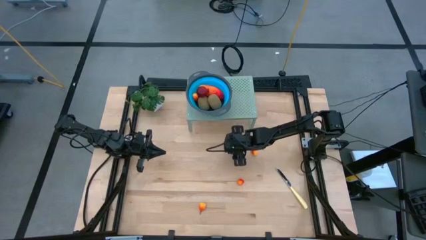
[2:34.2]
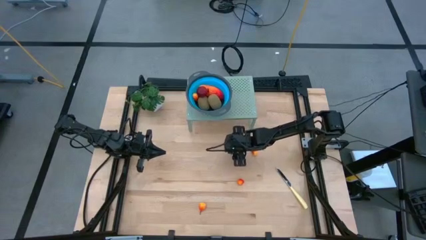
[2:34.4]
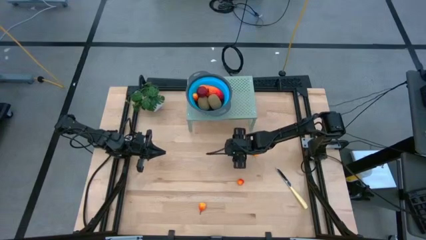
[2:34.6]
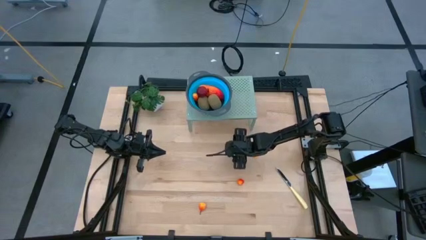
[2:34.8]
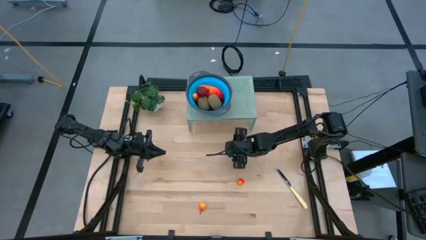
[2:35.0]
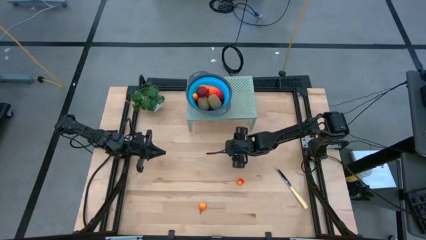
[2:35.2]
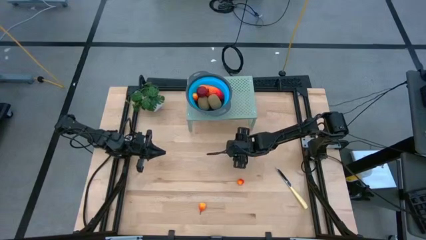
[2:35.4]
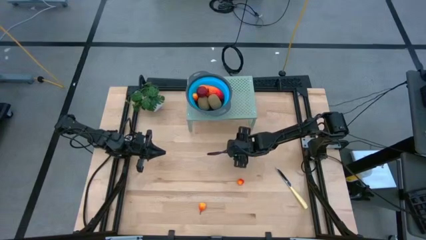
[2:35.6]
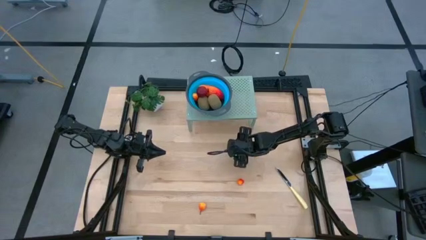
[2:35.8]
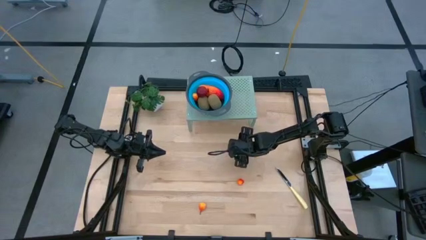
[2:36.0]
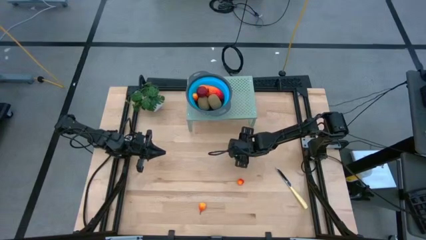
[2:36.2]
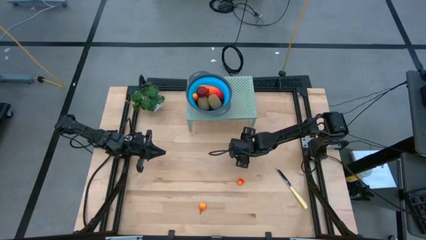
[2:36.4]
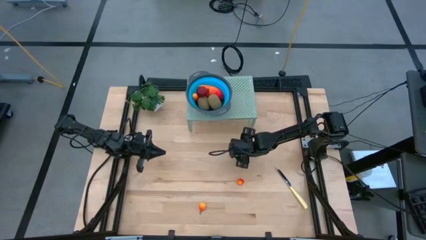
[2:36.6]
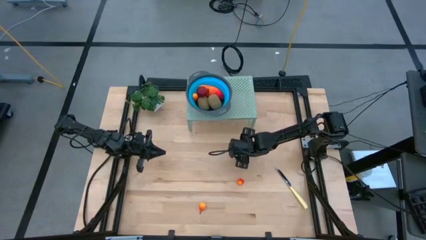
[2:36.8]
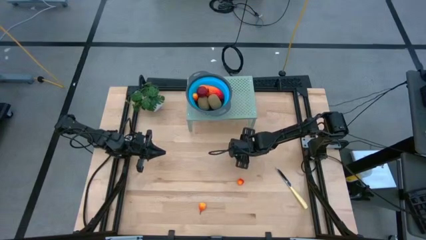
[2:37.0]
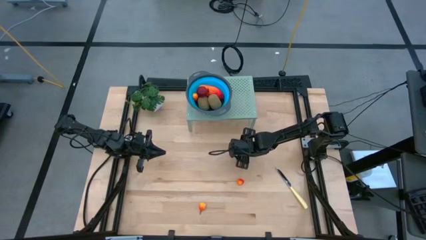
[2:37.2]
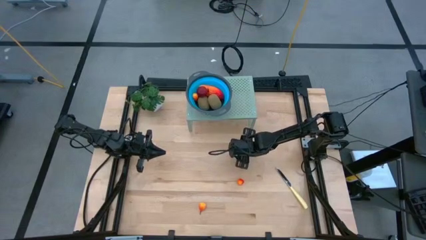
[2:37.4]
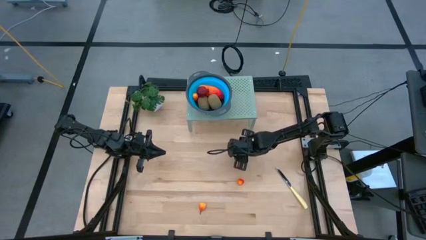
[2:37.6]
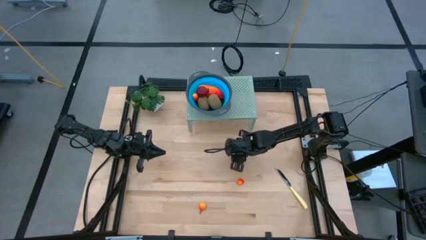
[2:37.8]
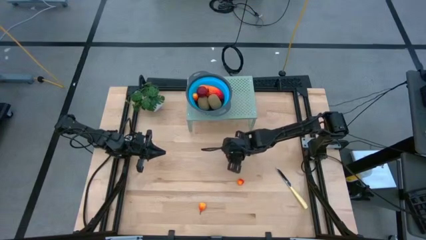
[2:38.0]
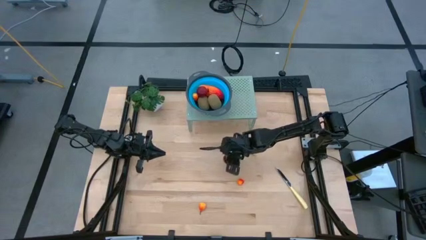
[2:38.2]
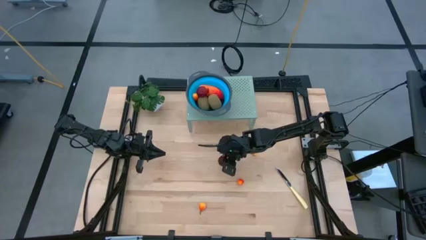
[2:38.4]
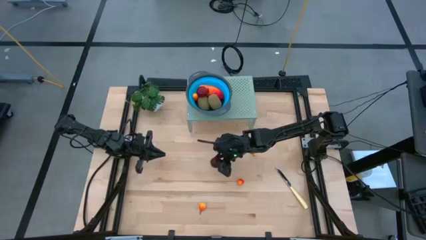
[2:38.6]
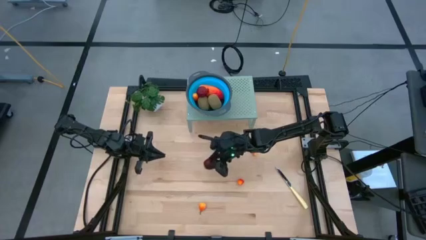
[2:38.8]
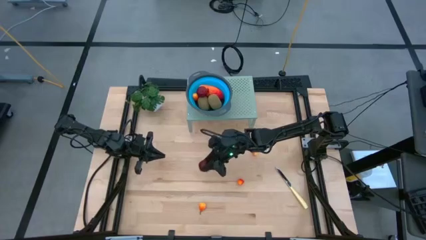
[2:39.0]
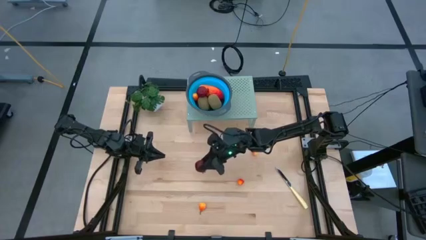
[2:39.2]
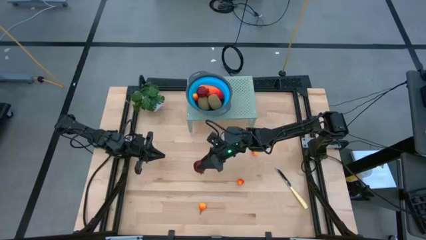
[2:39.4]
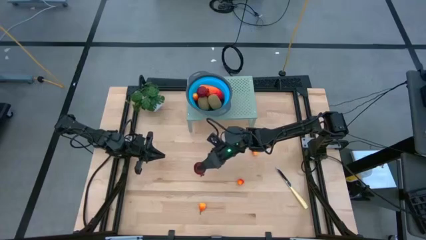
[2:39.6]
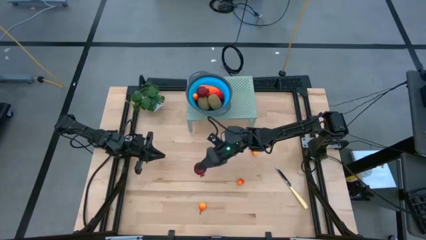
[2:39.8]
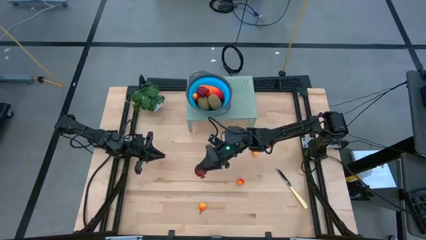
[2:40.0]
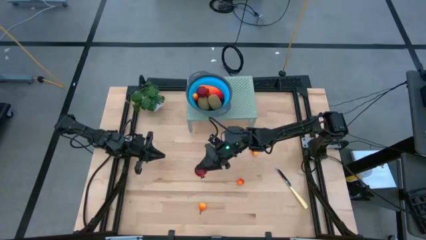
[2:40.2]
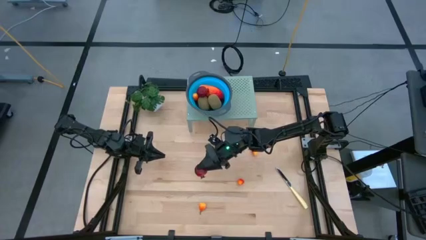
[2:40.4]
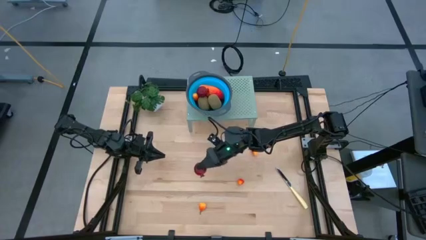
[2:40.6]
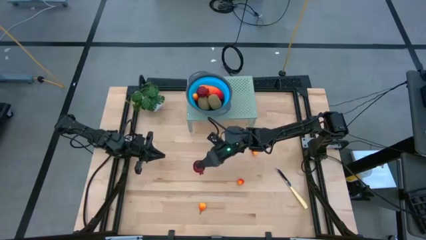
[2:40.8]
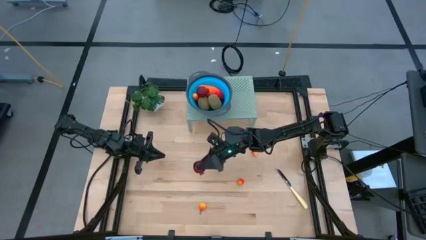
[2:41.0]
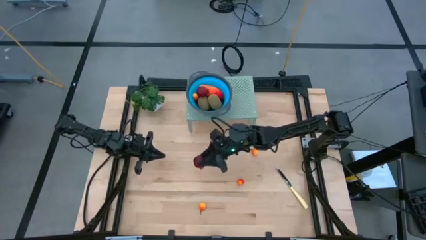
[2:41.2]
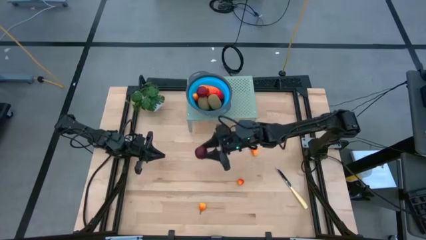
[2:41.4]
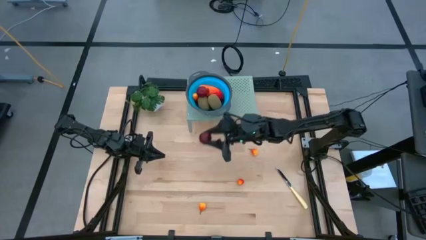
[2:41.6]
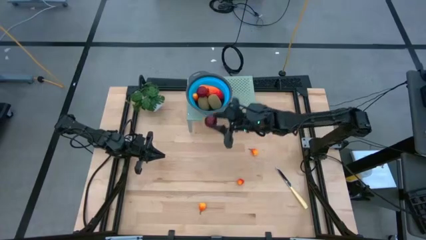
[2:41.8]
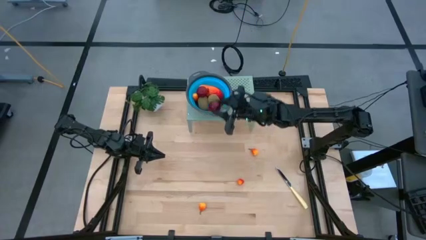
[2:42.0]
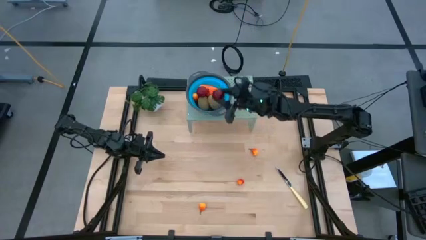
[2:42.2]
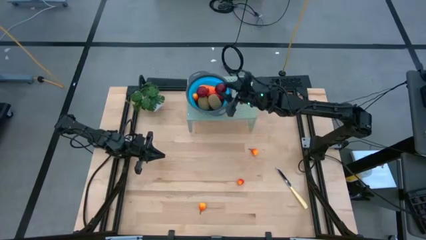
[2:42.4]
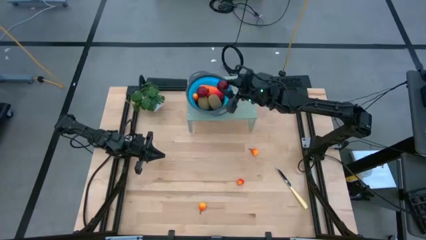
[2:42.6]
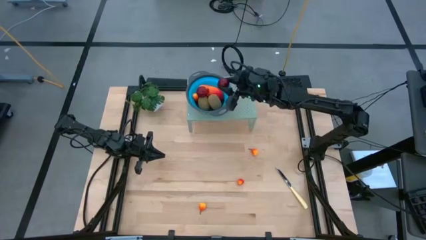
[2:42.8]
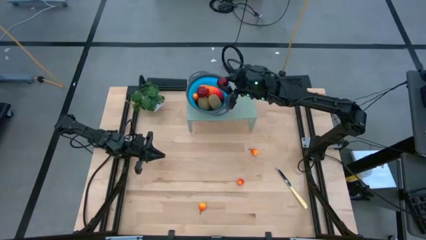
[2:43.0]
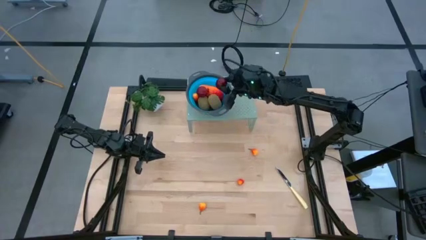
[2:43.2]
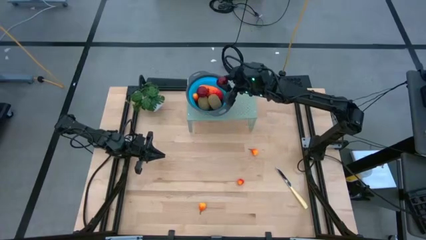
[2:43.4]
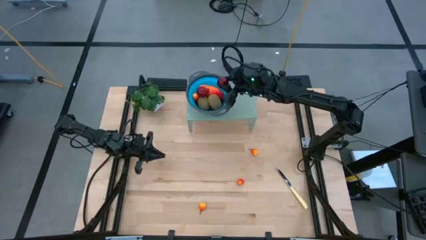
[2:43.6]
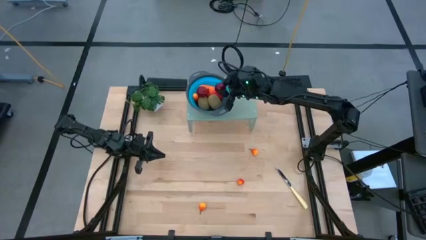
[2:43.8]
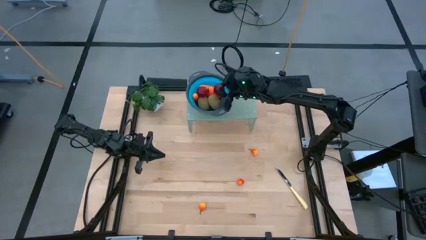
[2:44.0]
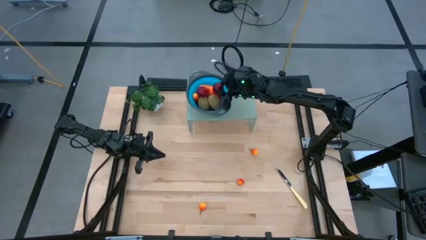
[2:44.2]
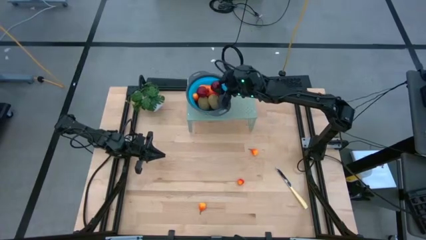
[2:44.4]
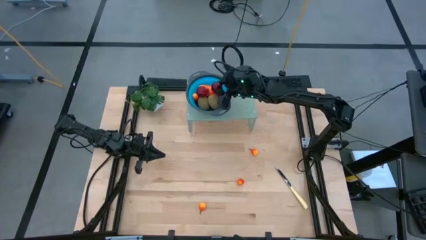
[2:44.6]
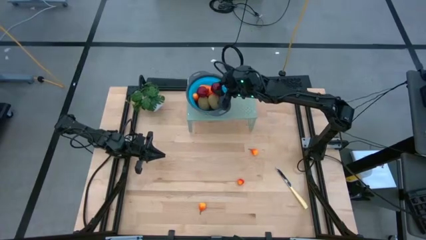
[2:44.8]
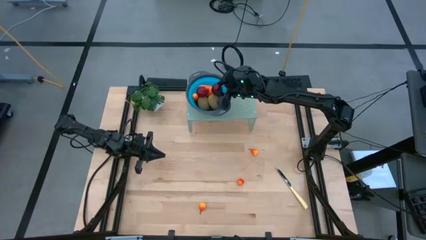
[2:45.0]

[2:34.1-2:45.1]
Task: Pick & Place Fruit
Put the red pomegranate into the blue bowl on the shelf

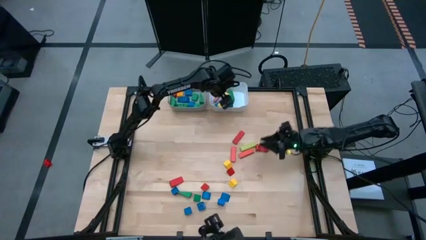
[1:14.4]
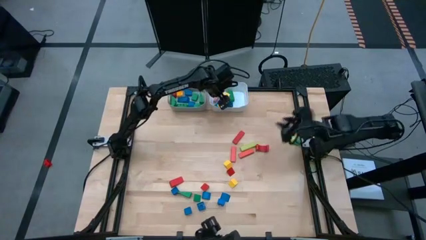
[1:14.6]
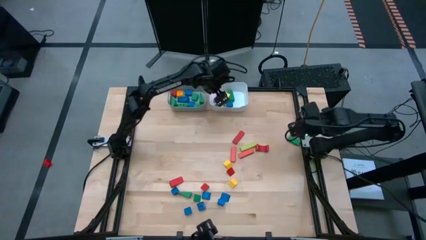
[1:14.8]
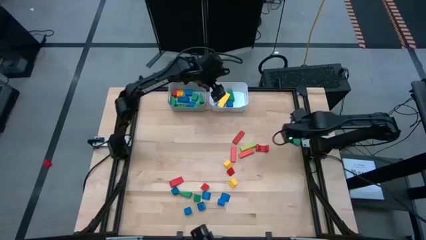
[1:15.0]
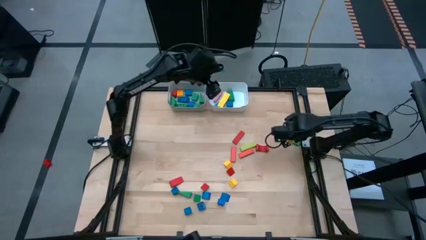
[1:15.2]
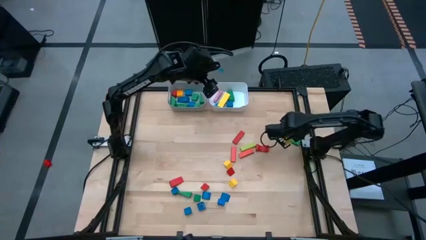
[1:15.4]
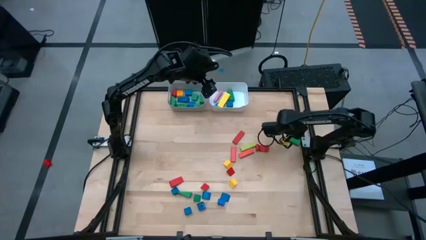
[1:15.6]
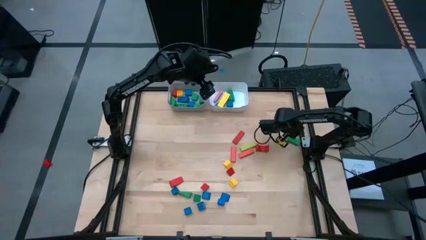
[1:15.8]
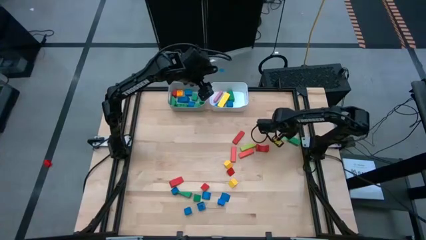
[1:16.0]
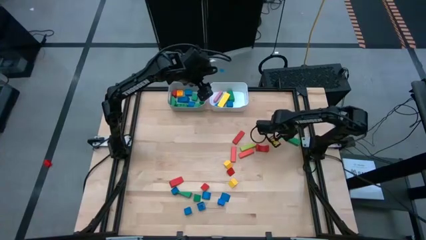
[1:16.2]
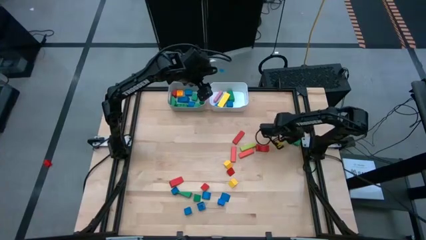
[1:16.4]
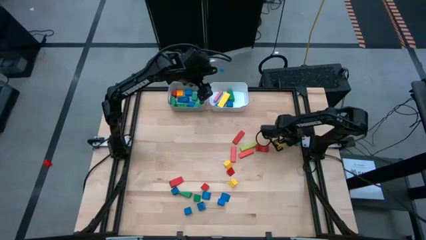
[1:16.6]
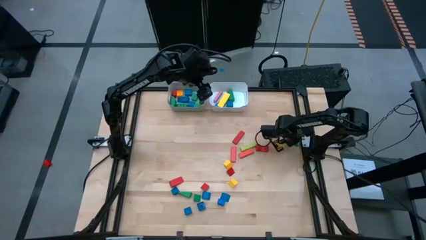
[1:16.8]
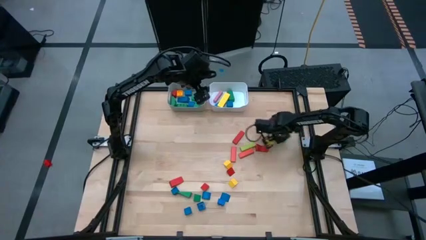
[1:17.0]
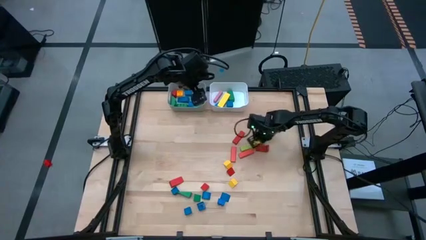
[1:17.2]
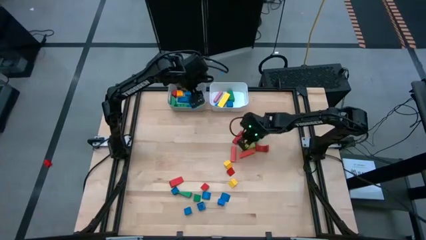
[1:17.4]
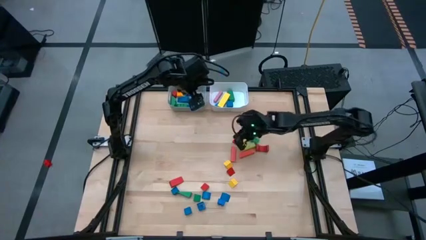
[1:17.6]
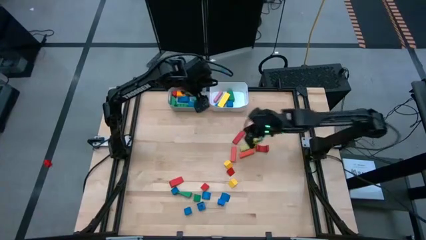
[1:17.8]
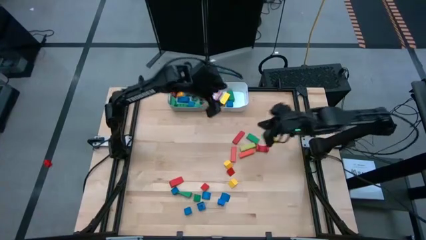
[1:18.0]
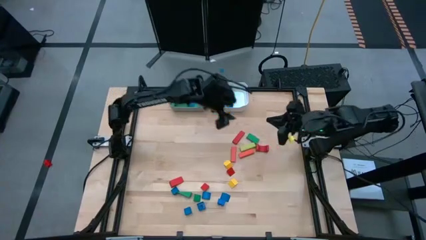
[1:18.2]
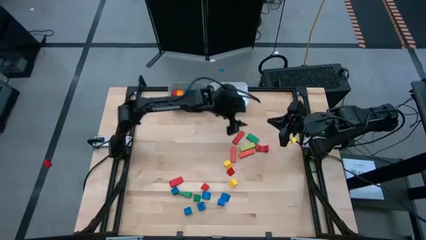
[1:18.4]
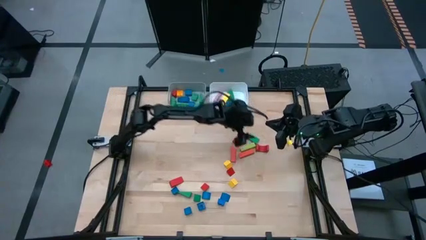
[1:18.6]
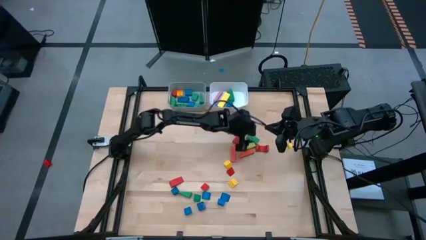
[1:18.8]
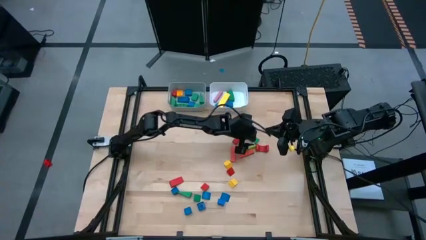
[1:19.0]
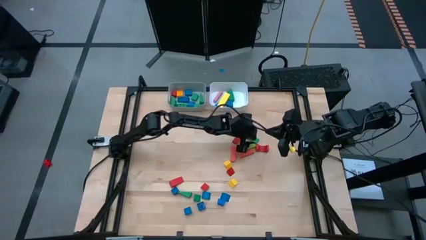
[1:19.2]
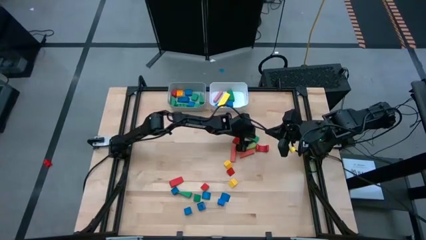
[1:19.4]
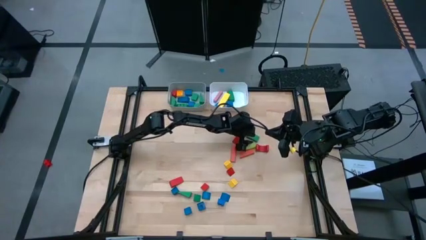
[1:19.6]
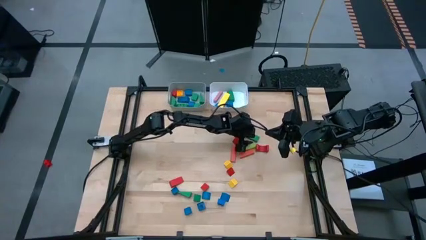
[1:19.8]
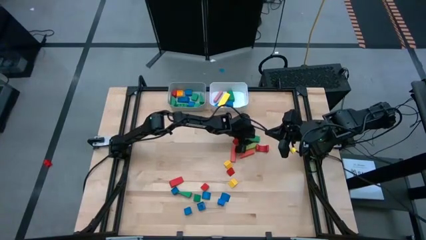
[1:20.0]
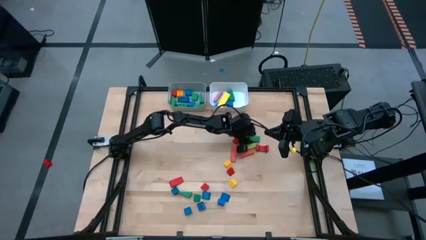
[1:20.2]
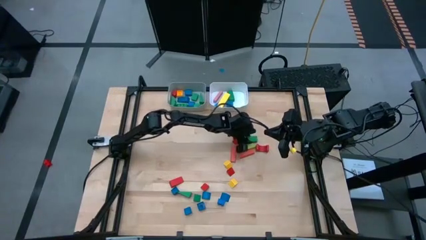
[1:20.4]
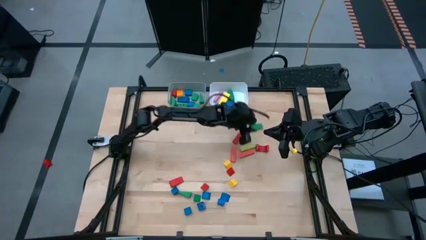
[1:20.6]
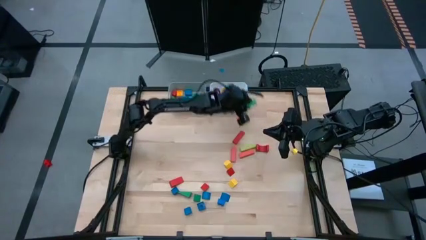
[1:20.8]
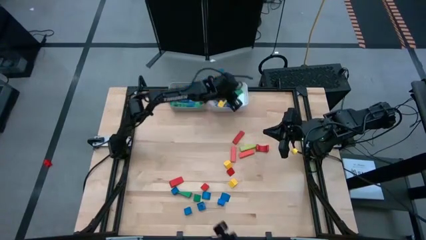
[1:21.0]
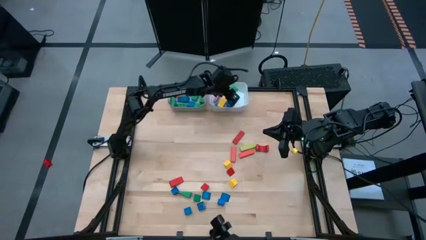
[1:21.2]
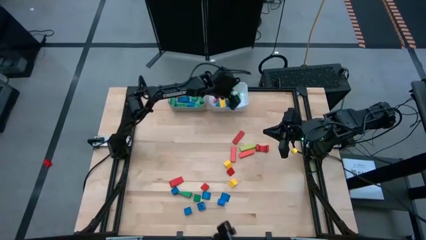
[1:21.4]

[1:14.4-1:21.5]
Task: Sort blocks by size
Put the green rectangular block into the white bin
